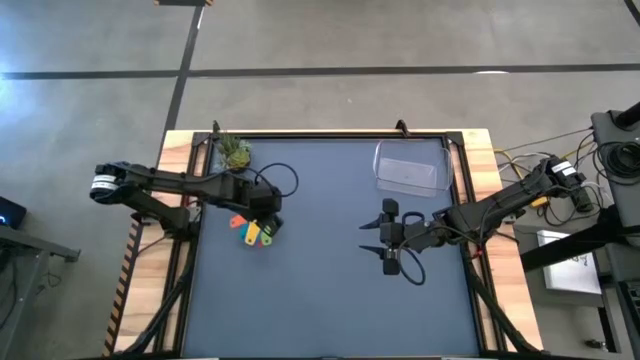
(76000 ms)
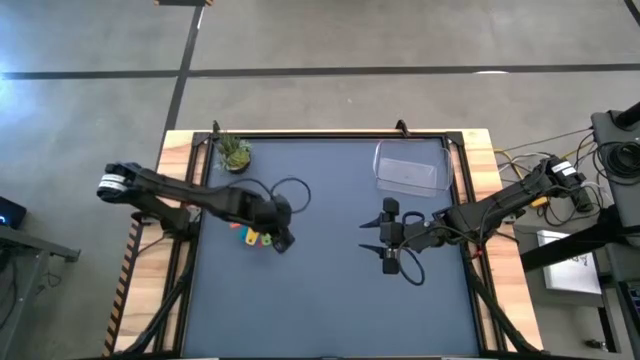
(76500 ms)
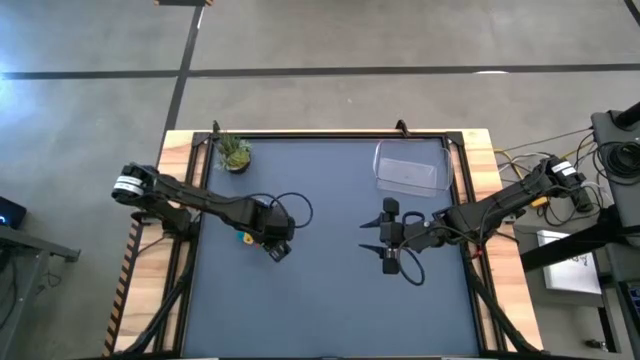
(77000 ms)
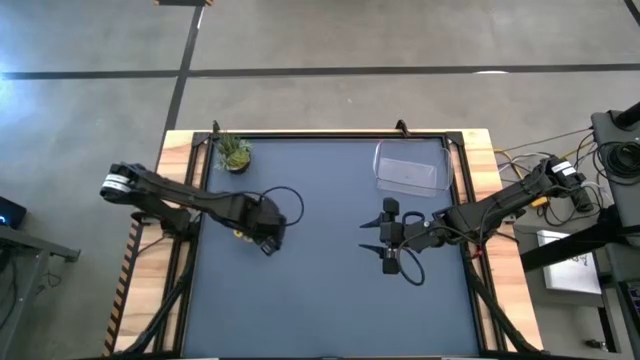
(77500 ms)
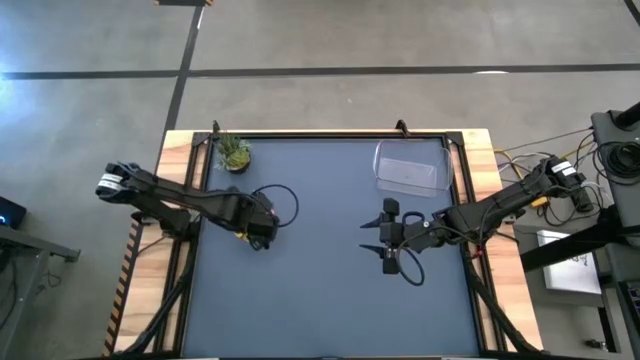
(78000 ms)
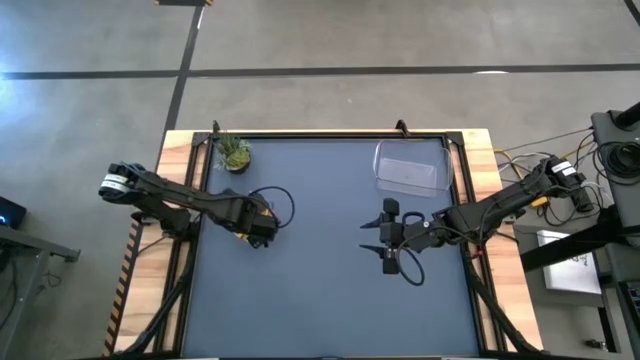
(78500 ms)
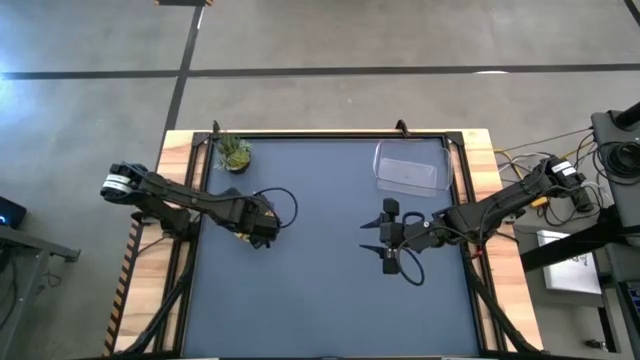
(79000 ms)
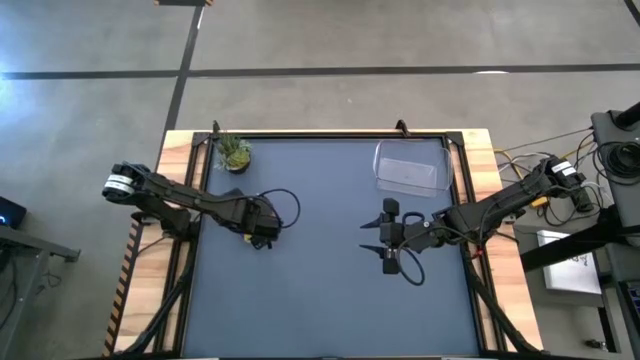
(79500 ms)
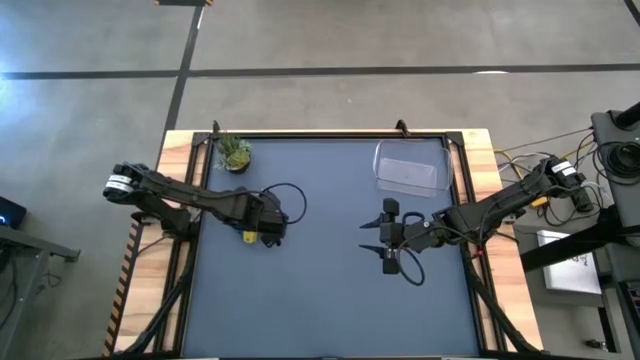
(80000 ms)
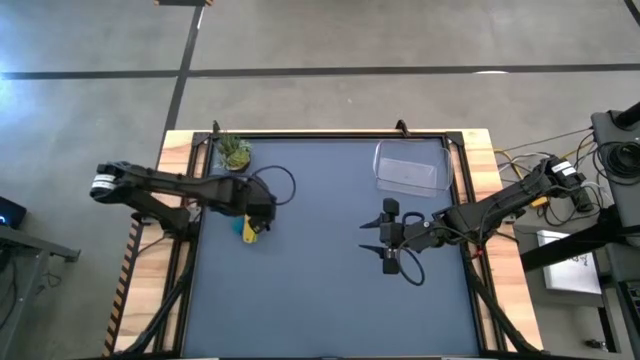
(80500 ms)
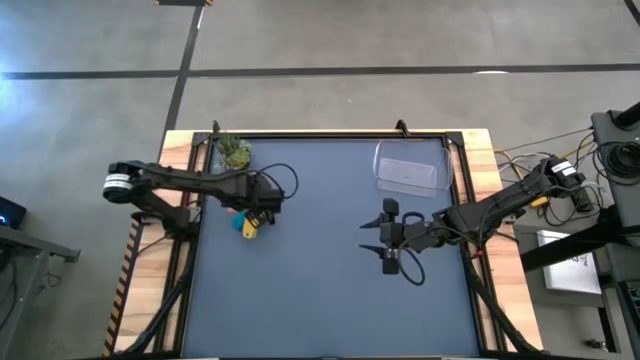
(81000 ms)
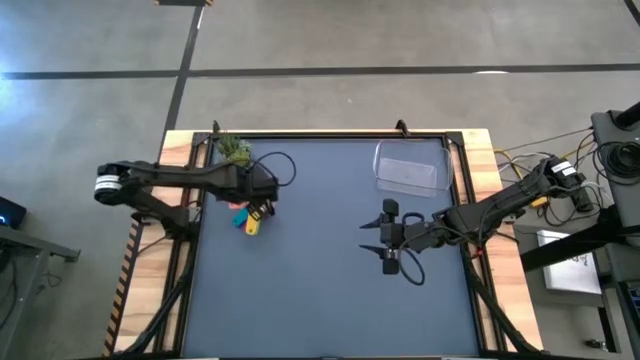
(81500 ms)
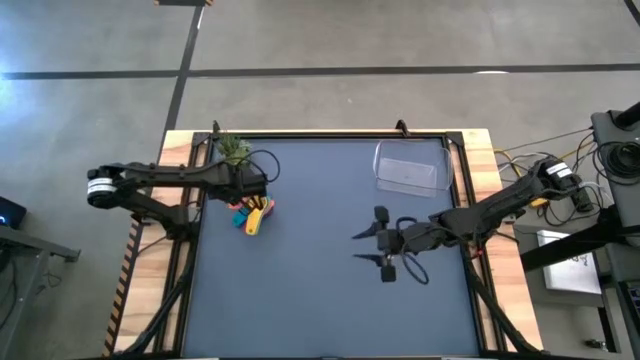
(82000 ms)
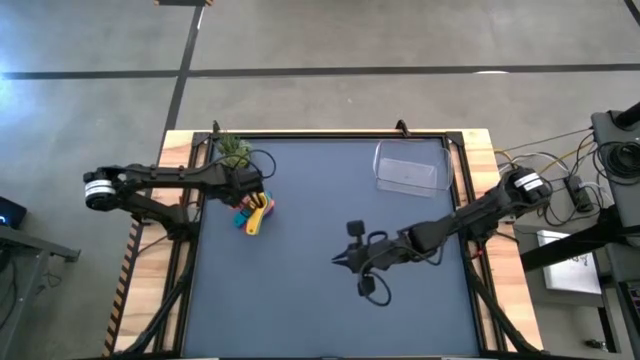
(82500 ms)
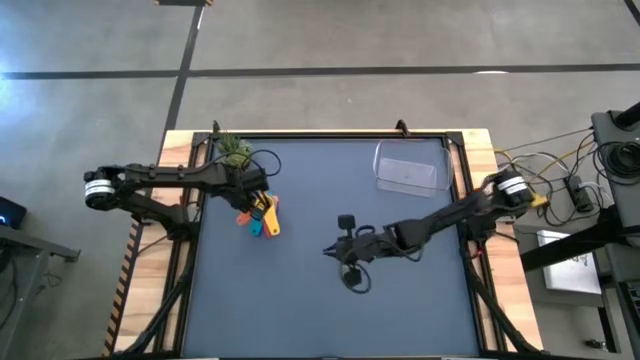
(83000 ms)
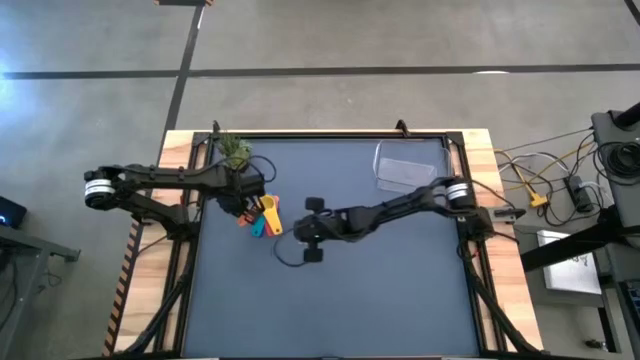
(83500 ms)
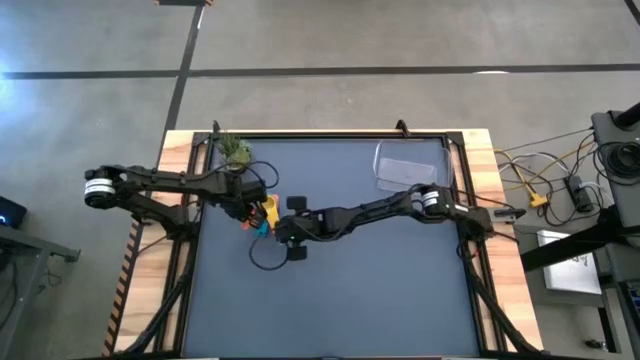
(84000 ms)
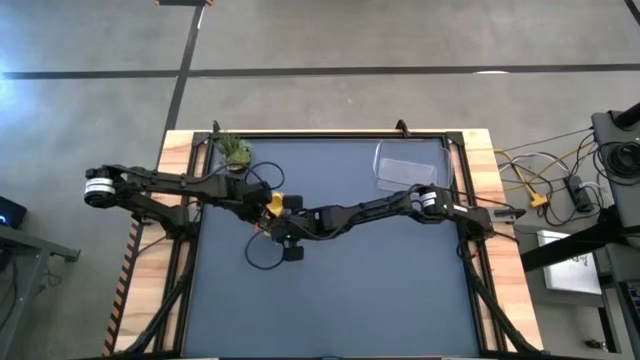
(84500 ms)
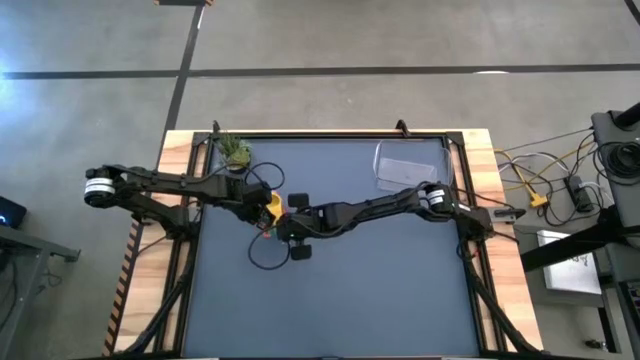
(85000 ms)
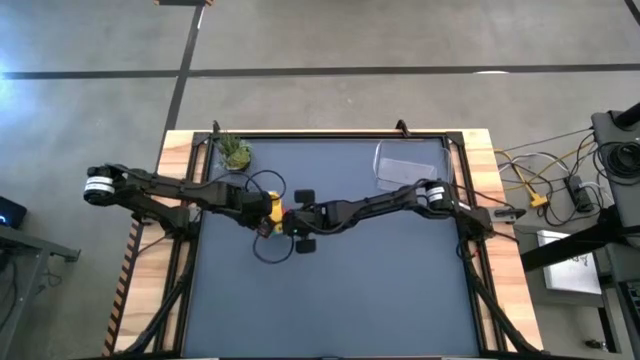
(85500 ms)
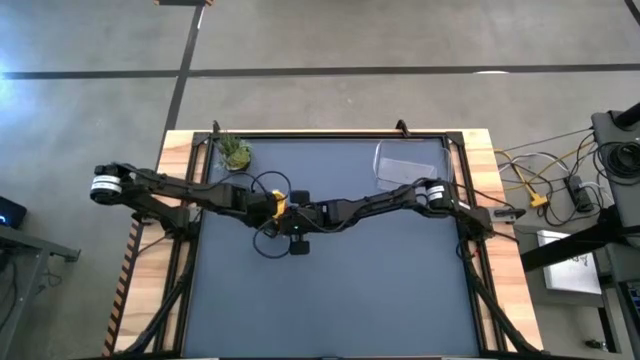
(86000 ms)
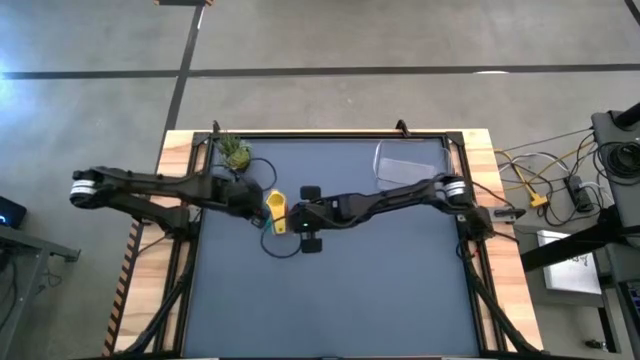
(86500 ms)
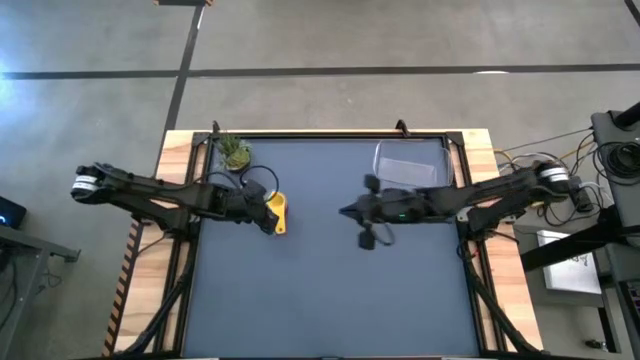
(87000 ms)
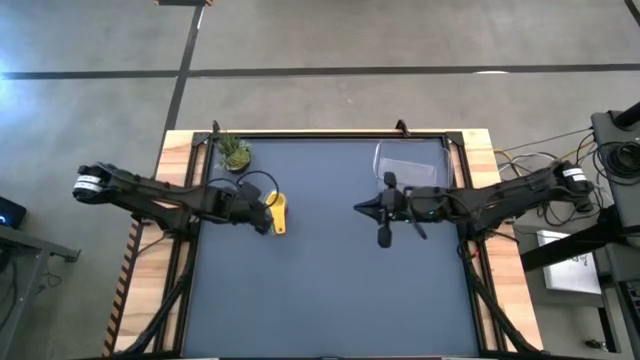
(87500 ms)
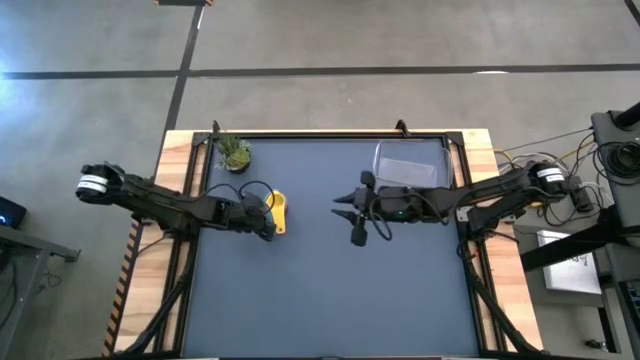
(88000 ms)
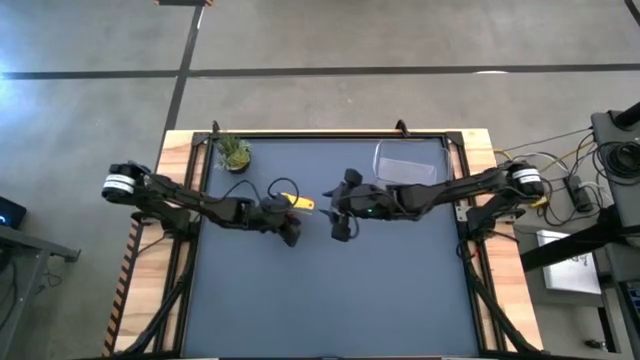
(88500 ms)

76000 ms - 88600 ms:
Task: Nest measuring cups in basket
Adjust the nested measuring cups

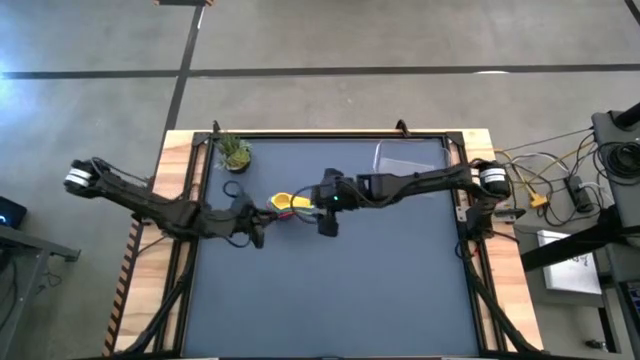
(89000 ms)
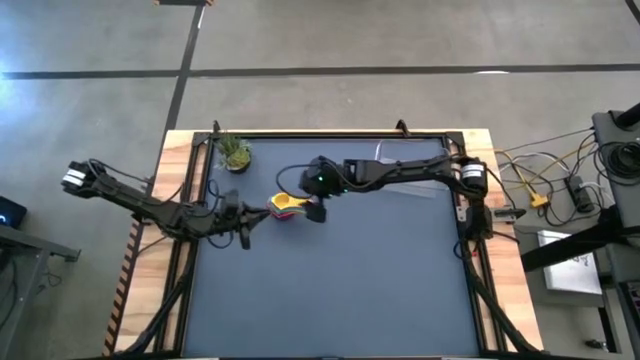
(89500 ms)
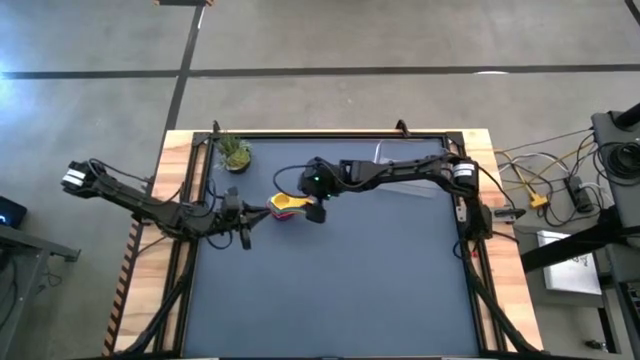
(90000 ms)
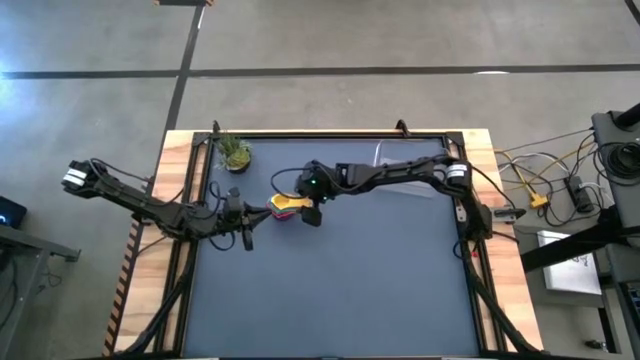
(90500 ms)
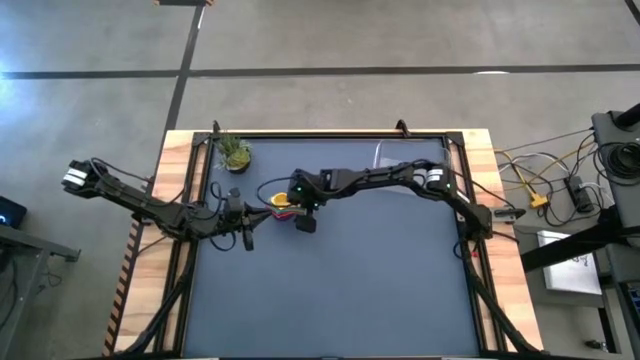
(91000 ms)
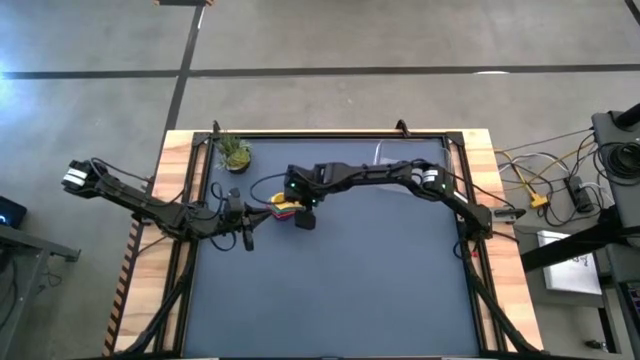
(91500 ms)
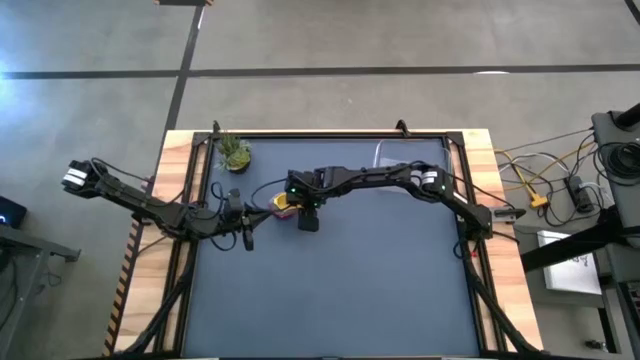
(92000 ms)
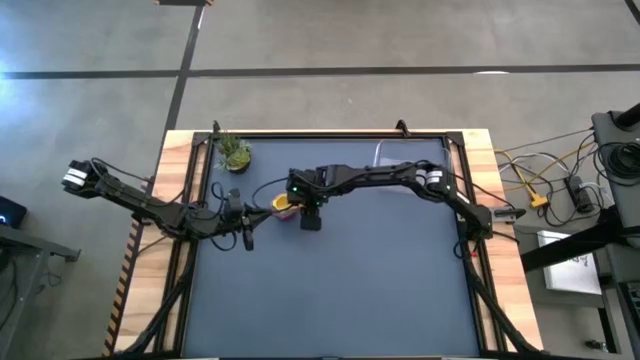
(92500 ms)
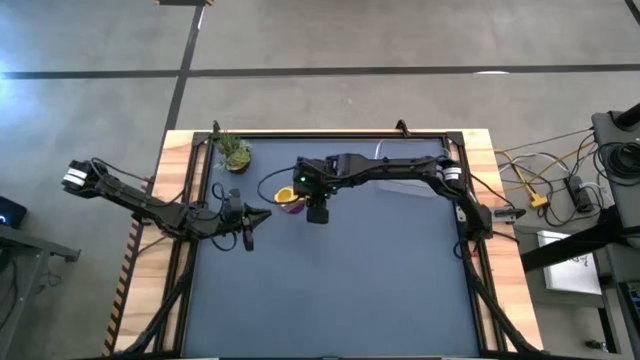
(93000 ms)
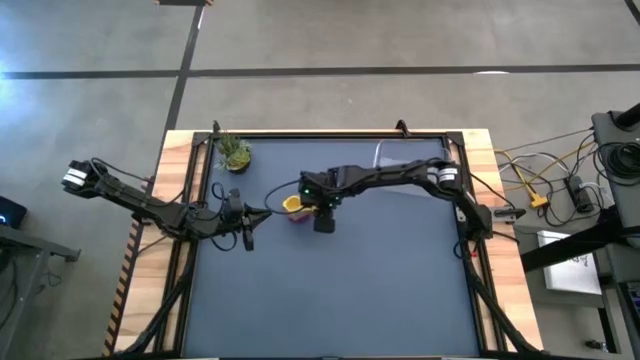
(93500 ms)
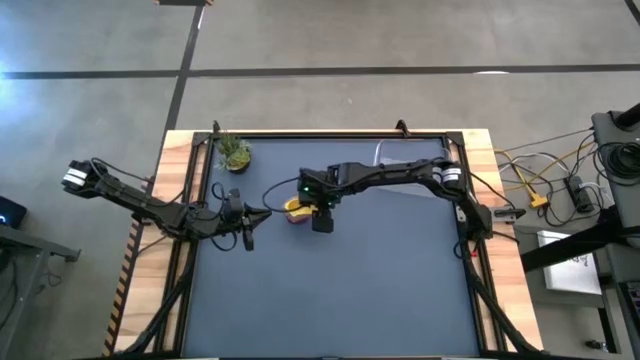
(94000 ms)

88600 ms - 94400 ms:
Put the nested measuring cups inside the transparent bin

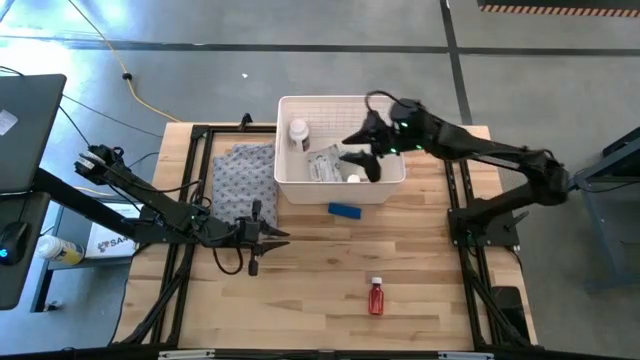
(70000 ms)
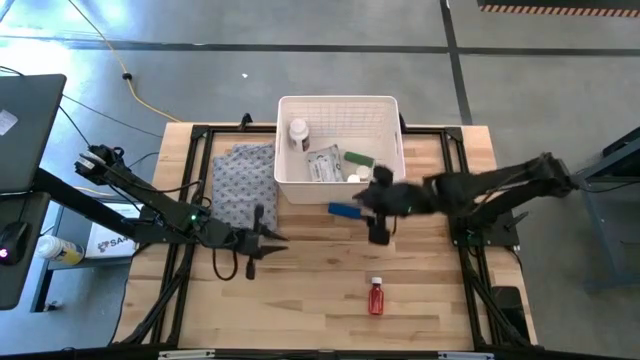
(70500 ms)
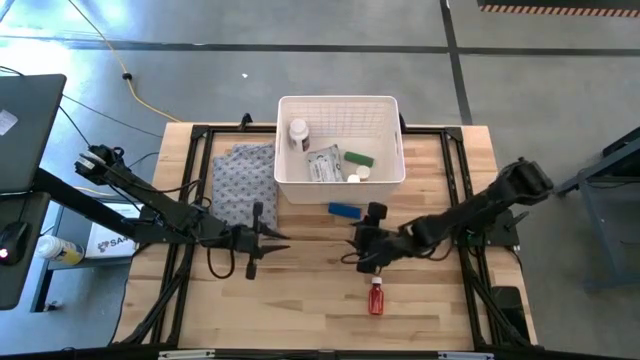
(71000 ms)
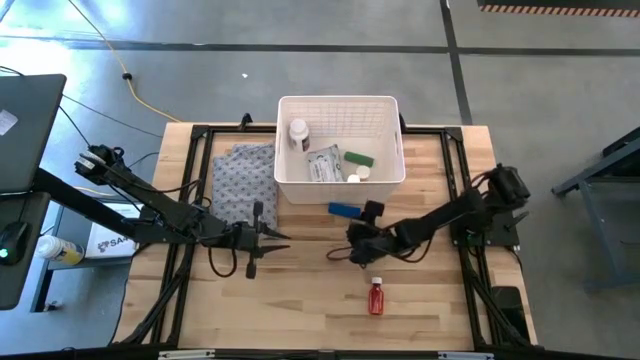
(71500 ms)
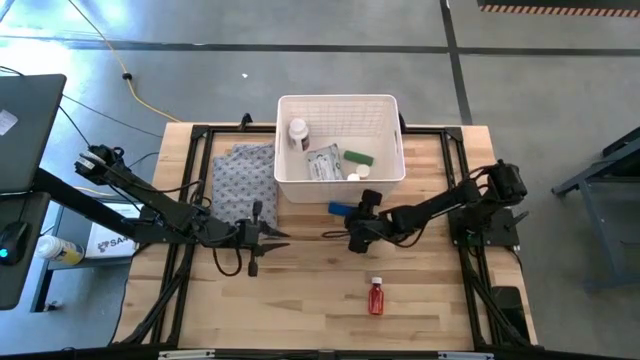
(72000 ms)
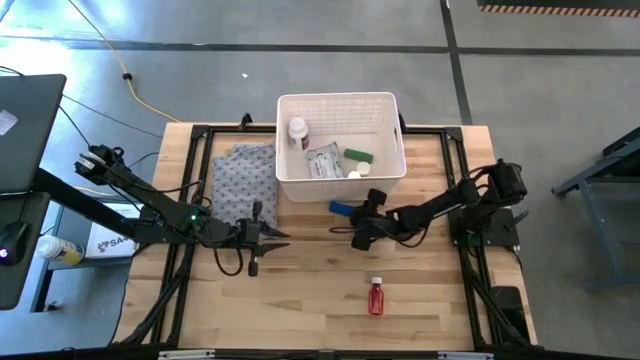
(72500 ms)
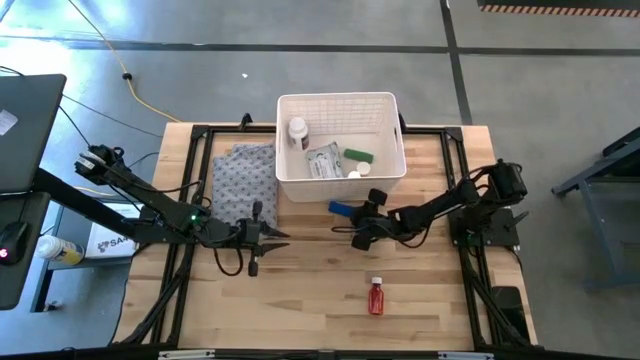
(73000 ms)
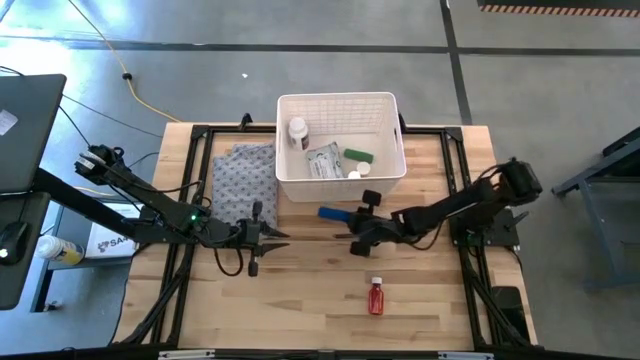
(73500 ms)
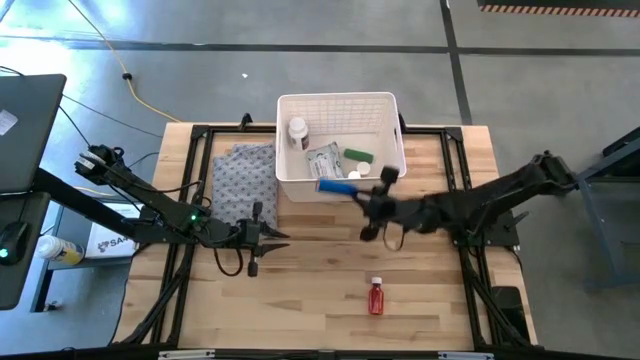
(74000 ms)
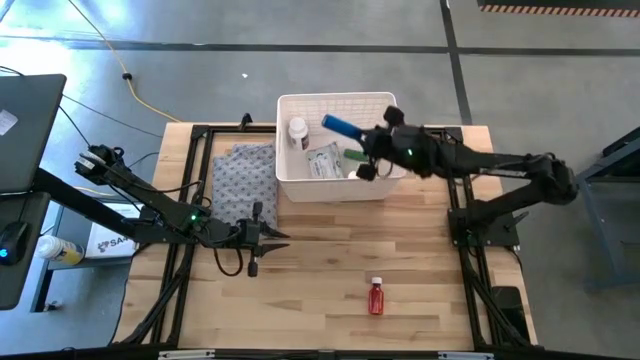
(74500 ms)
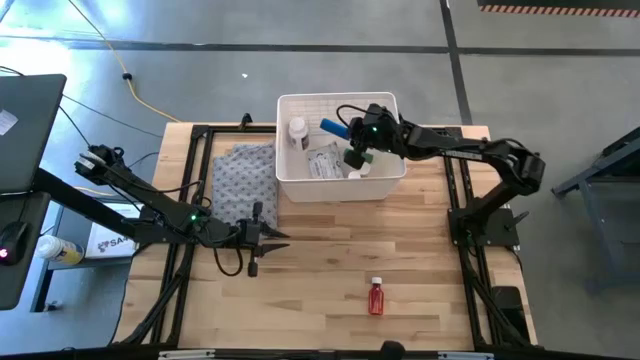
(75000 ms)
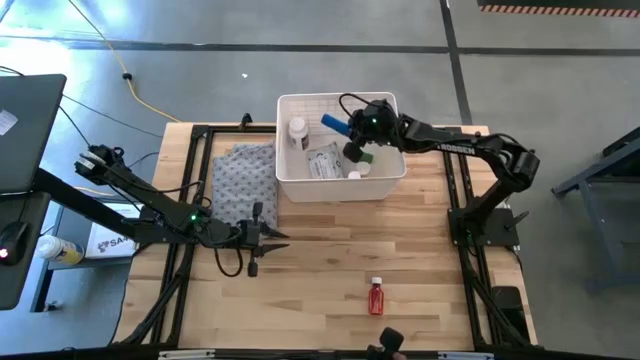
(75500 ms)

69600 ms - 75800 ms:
Task: Pick & place medical supplies in basket/bin
Put the blue bandage into the white bin
